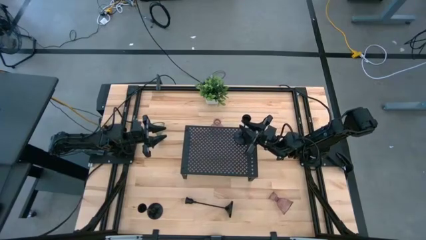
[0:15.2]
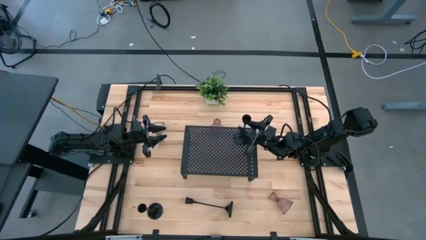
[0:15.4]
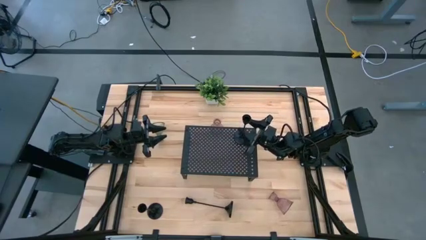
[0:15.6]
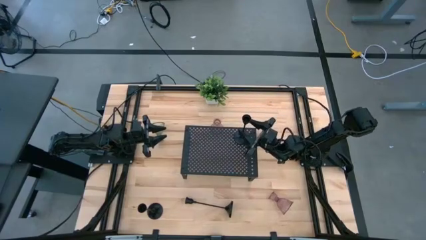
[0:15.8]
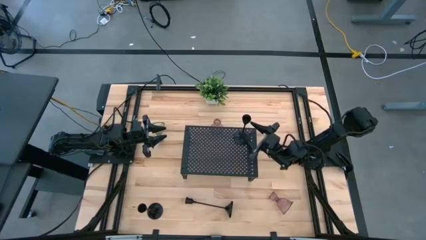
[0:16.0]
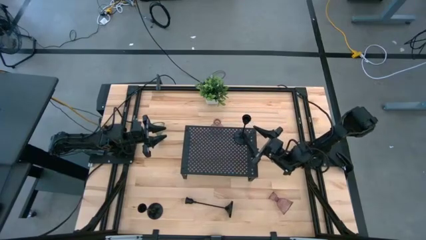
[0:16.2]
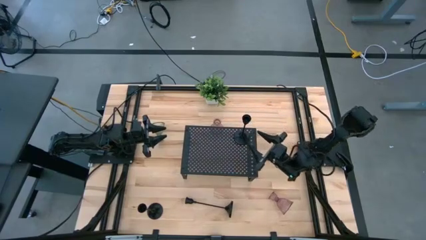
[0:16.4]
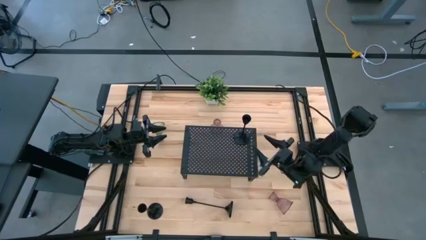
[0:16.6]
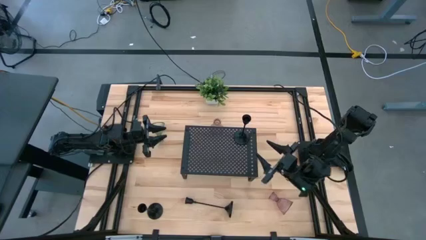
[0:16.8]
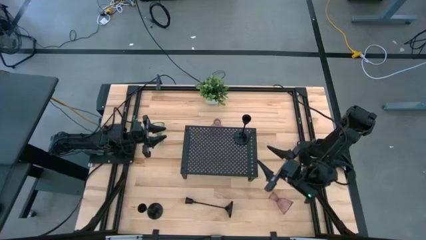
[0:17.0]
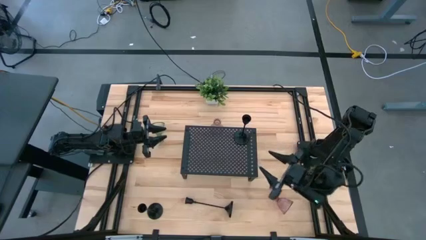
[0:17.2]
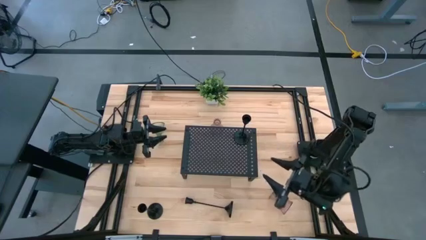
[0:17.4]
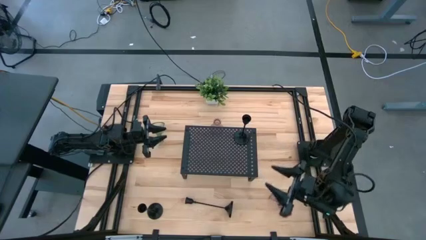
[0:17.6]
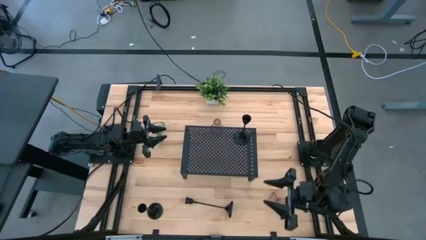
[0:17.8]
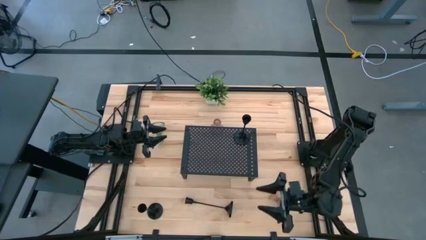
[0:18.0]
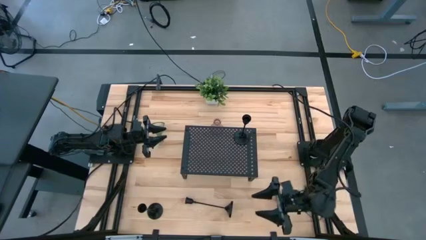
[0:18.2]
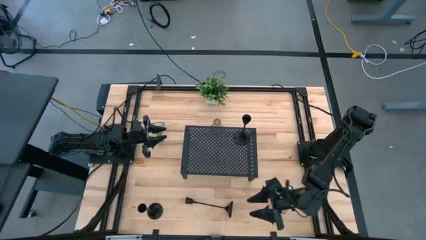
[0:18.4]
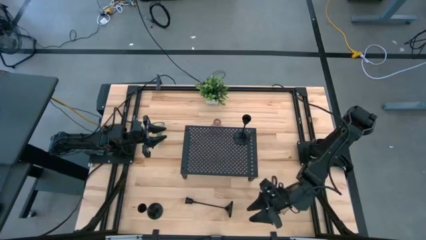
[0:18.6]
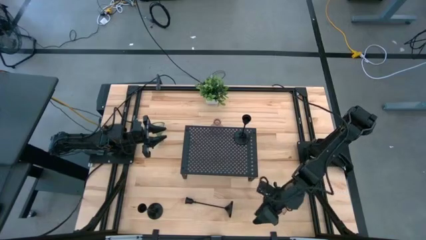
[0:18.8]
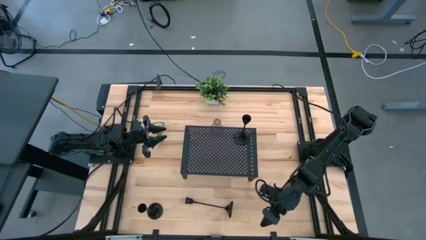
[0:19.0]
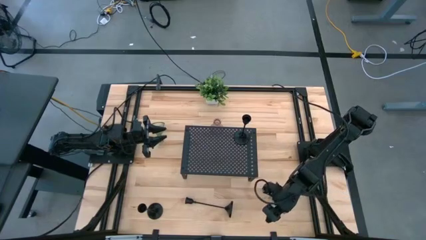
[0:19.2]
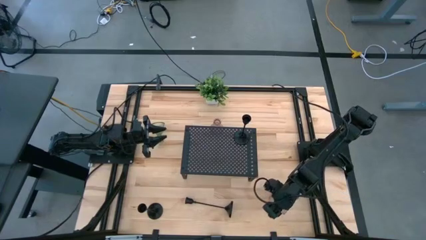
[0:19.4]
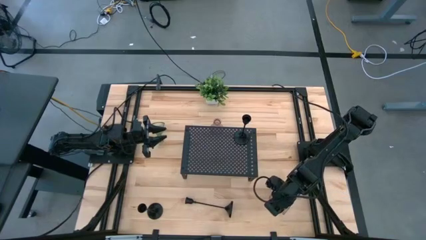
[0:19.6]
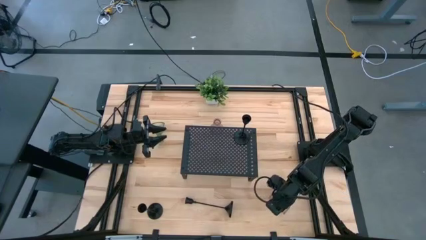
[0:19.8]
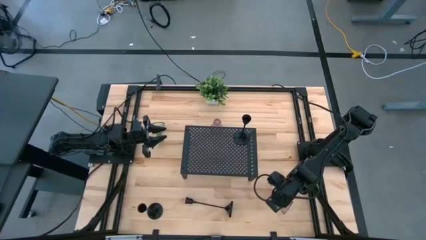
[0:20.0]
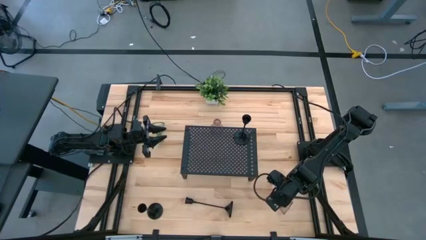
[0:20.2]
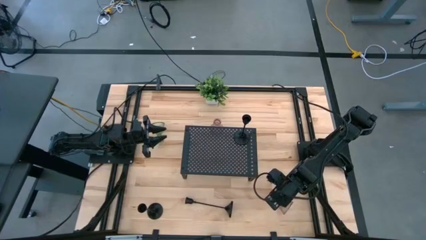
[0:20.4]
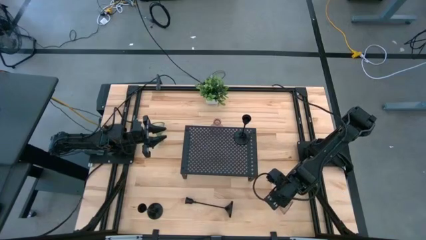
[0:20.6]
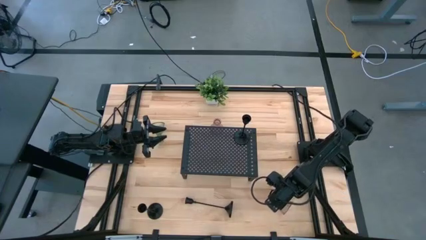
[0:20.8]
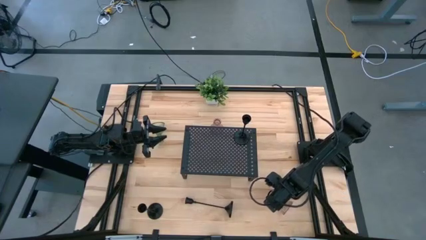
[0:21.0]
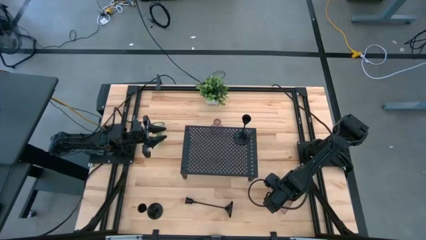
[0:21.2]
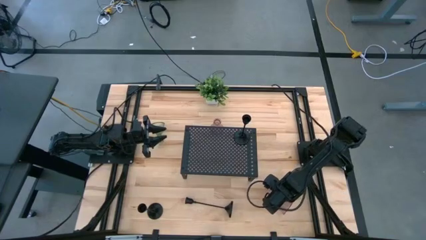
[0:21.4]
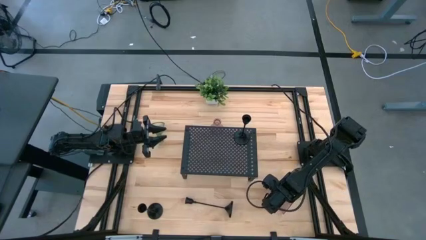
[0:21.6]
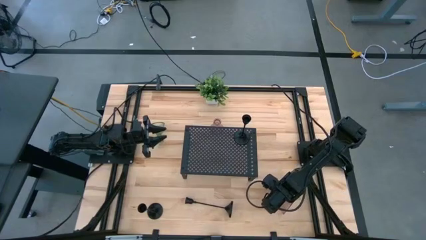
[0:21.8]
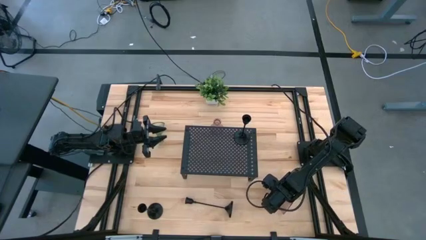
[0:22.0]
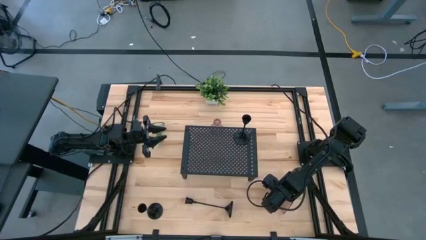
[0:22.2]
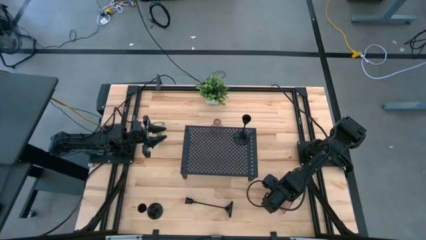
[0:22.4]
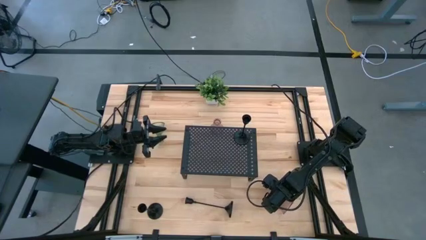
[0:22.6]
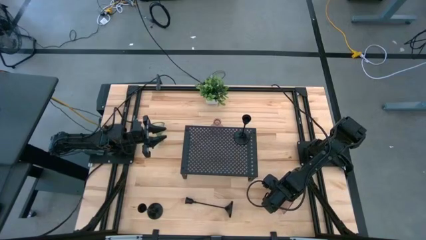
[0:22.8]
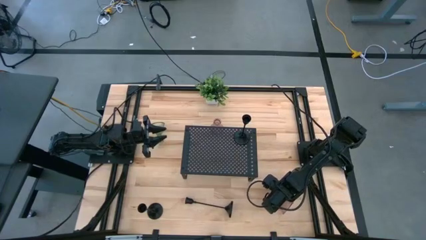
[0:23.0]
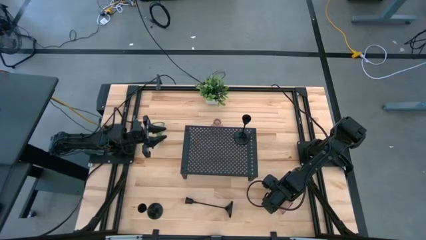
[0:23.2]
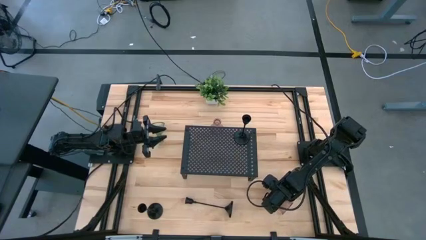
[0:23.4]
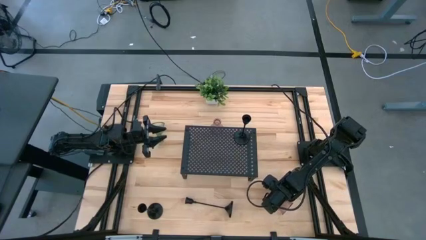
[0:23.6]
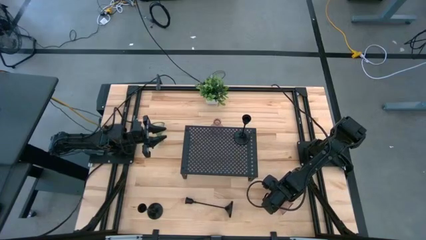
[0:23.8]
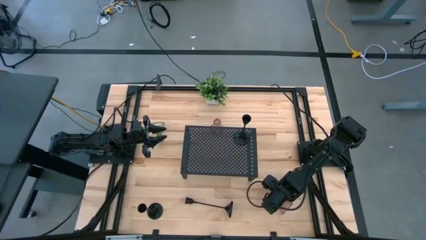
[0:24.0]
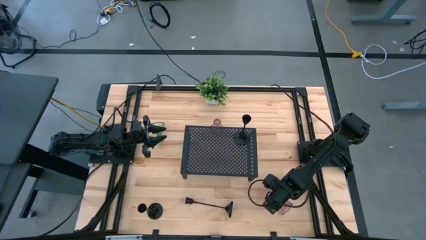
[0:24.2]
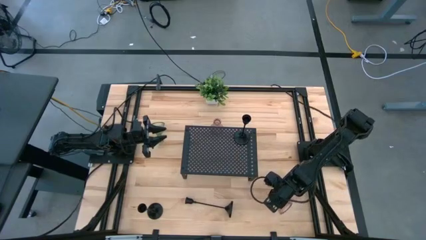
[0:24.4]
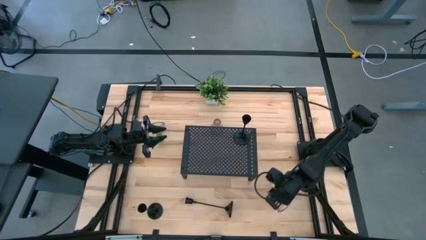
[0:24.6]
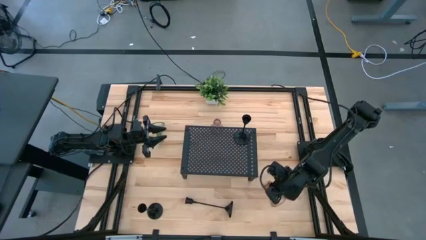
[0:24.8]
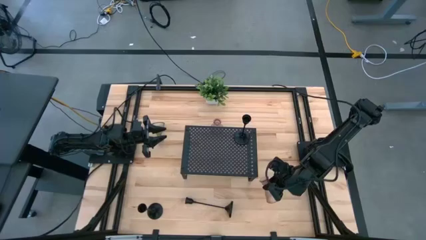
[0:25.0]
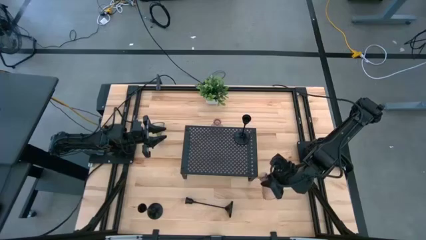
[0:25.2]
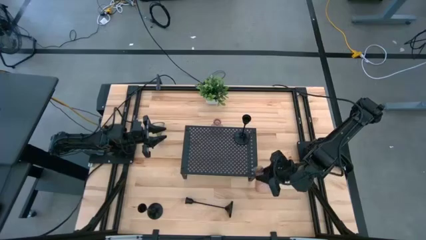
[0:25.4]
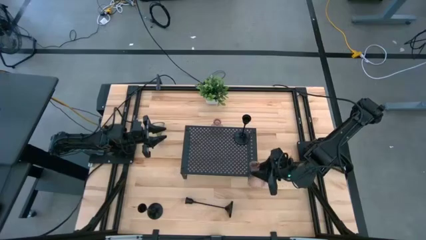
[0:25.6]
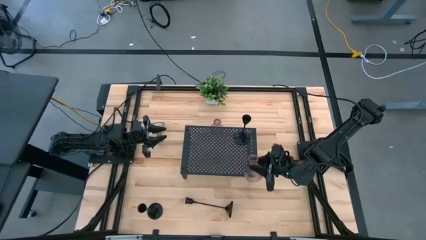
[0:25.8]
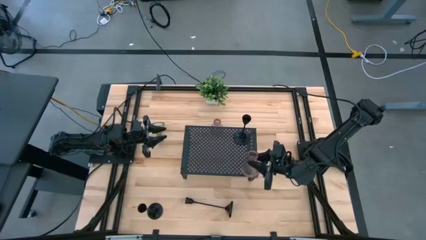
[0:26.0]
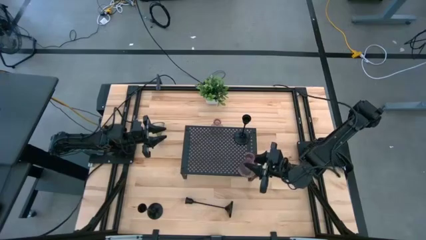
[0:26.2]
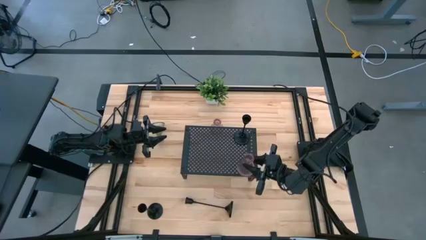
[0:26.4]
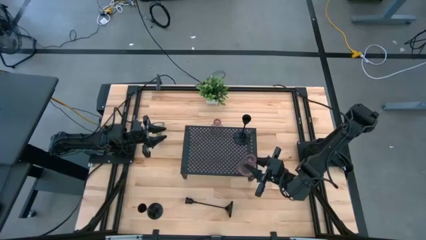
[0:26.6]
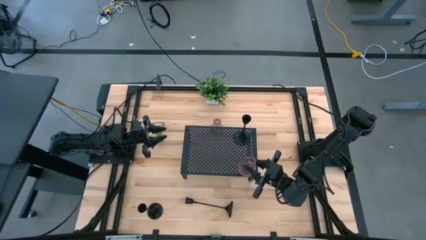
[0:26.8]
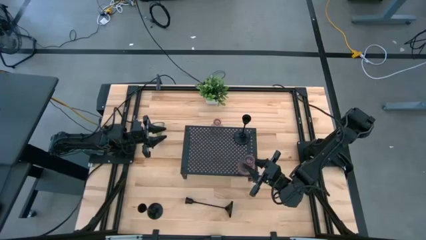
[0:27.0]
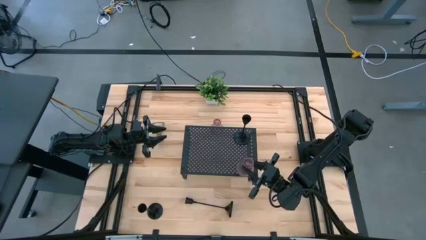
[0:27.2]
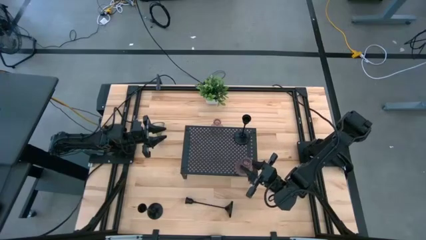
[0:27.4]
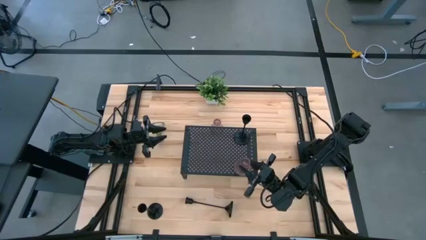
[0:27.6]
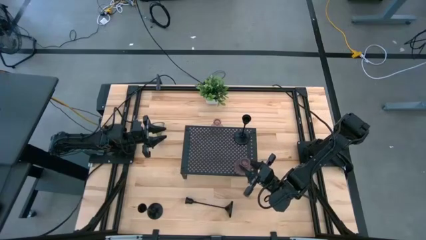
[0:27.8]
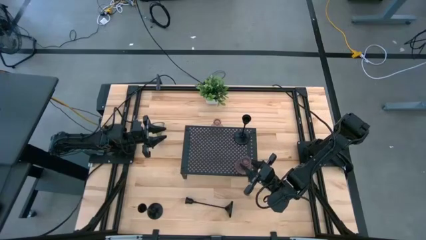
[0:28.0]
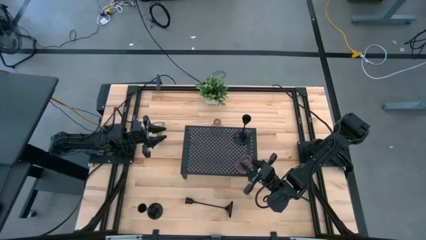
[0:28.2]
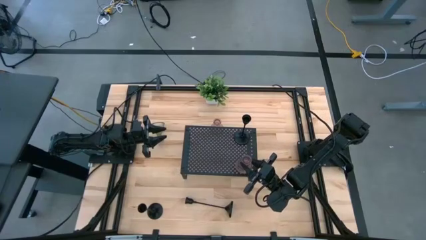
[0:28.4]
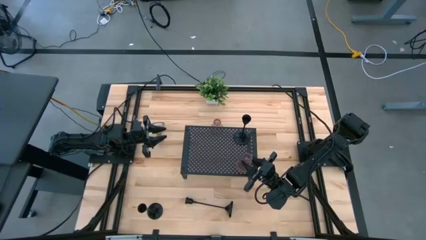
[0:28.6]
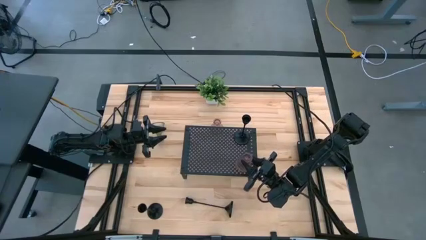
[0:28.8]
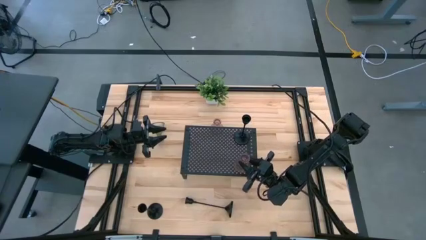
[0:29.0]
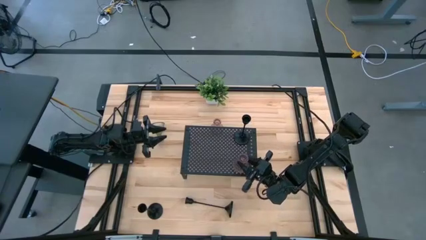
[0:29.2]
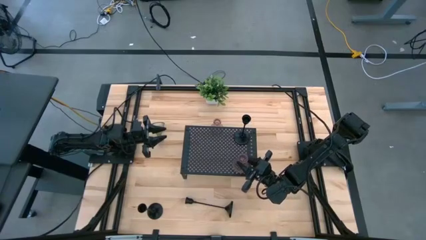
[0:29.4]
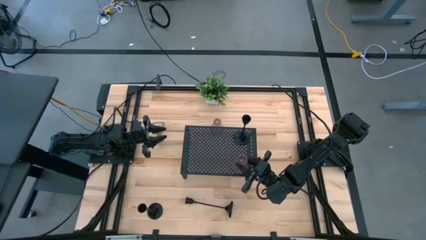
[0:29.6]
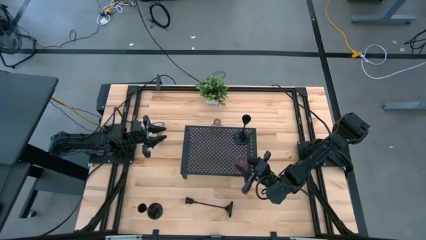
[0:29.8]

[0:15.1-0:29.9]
Task: Pick & Place candle stick holders
Align the bottom pink glass candle holder with the black candle holder on the shelf
